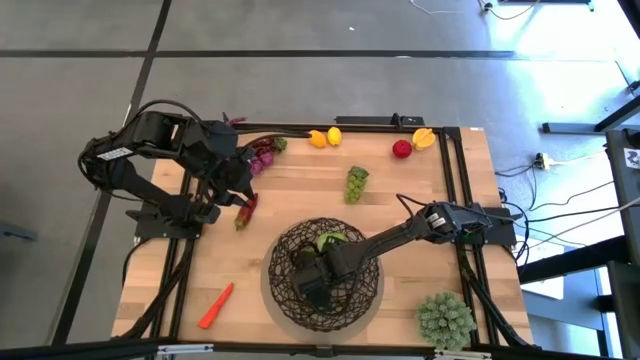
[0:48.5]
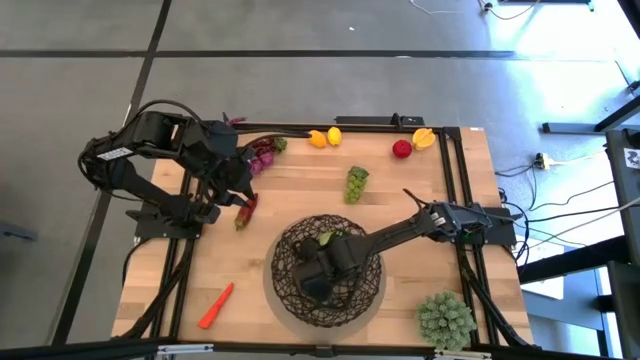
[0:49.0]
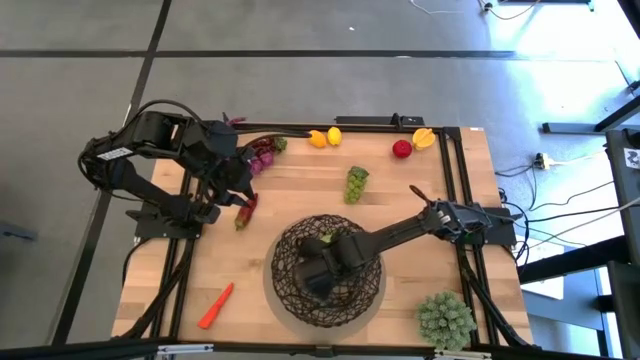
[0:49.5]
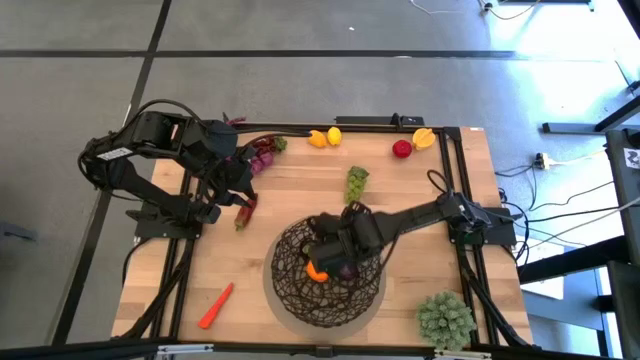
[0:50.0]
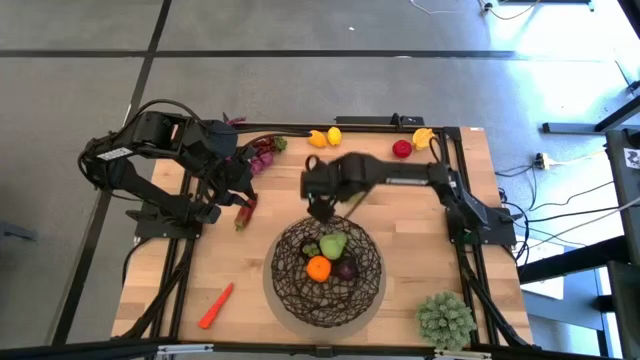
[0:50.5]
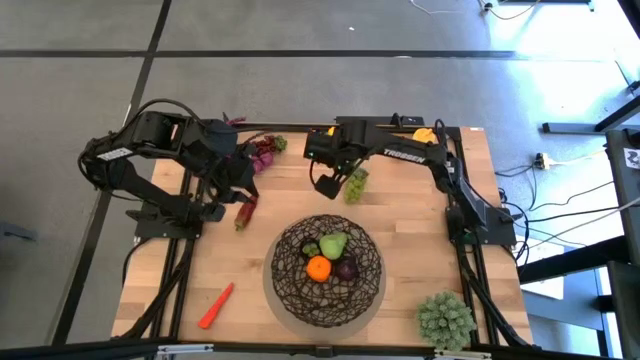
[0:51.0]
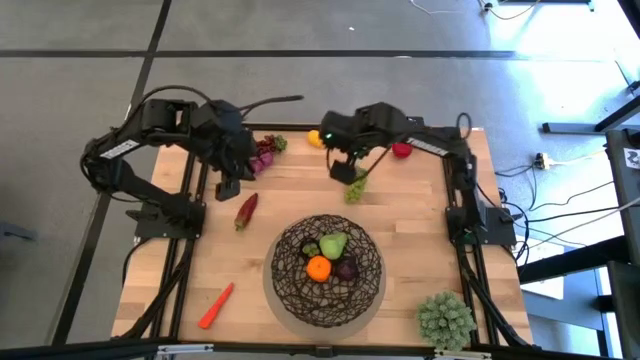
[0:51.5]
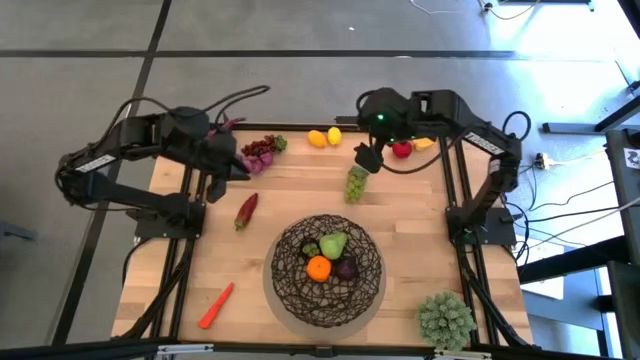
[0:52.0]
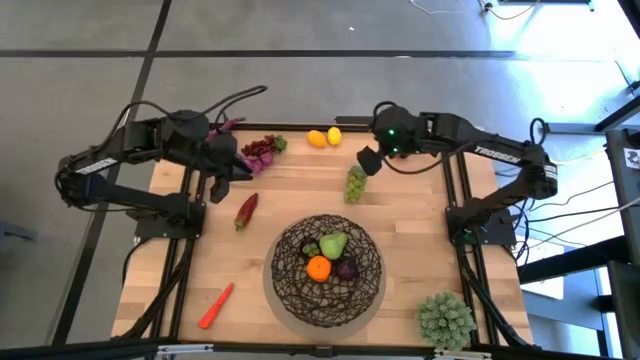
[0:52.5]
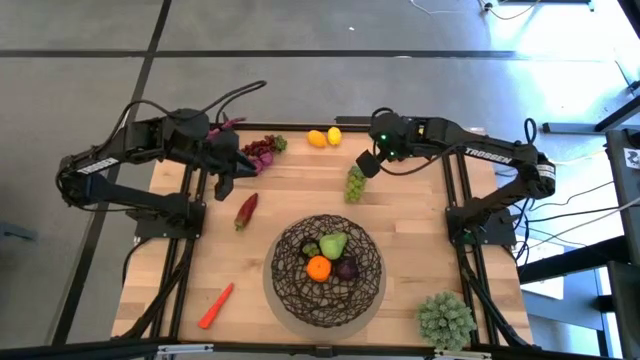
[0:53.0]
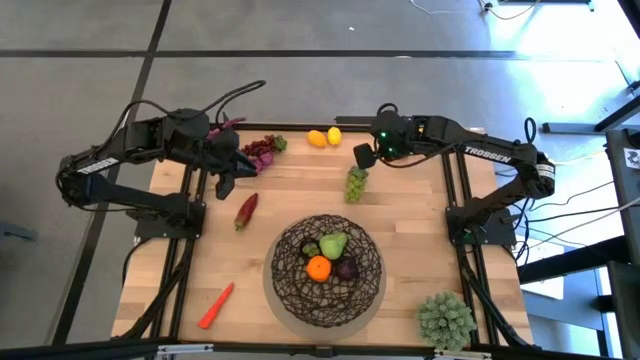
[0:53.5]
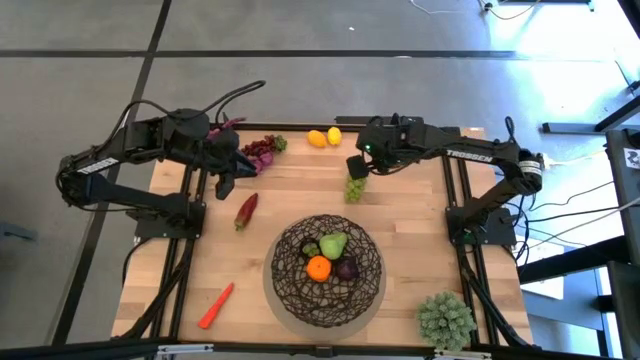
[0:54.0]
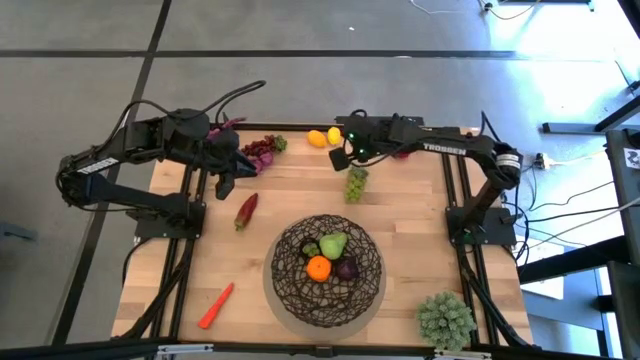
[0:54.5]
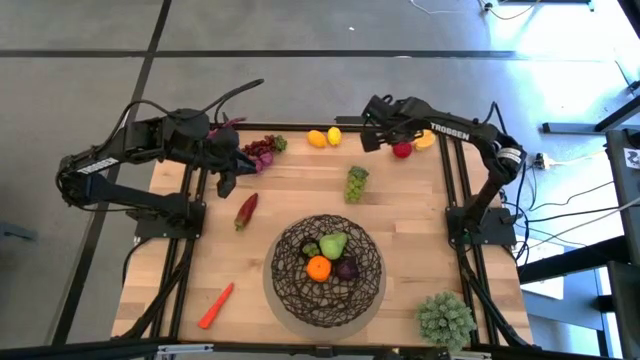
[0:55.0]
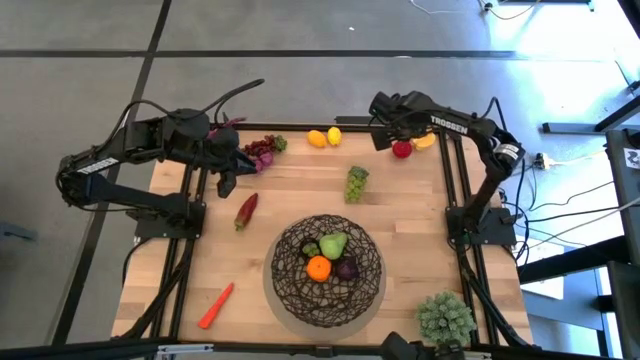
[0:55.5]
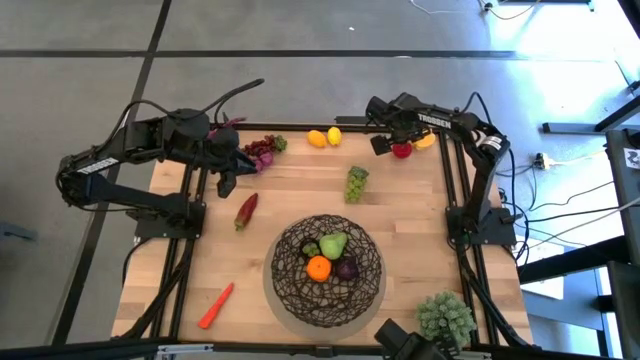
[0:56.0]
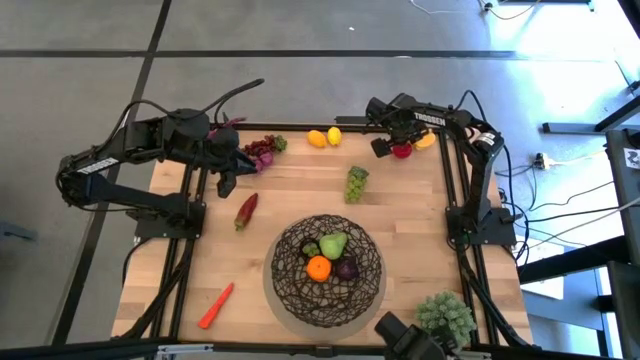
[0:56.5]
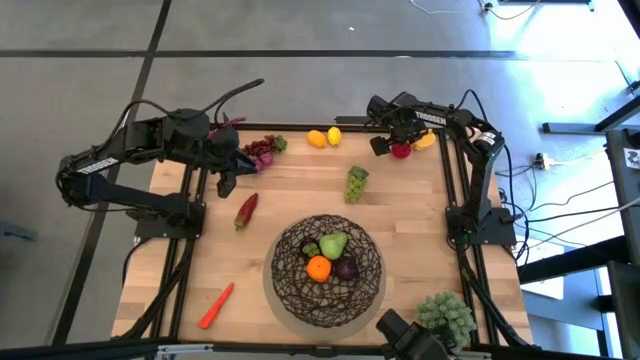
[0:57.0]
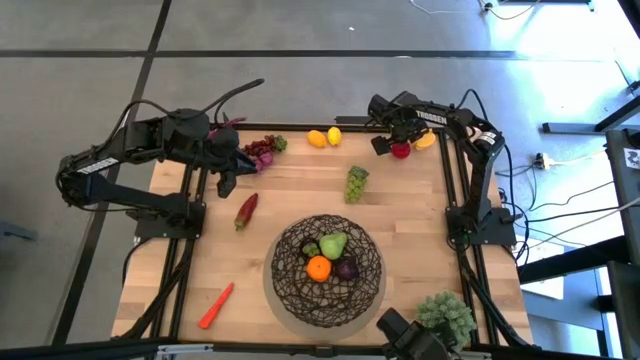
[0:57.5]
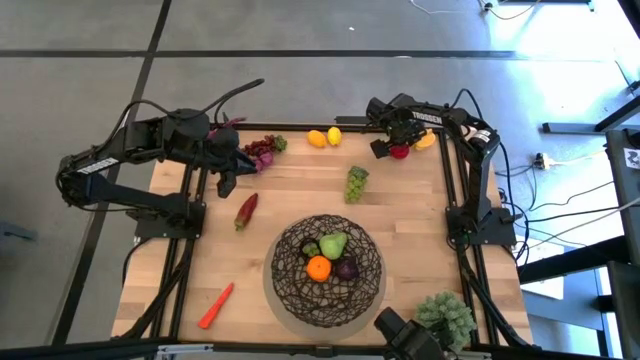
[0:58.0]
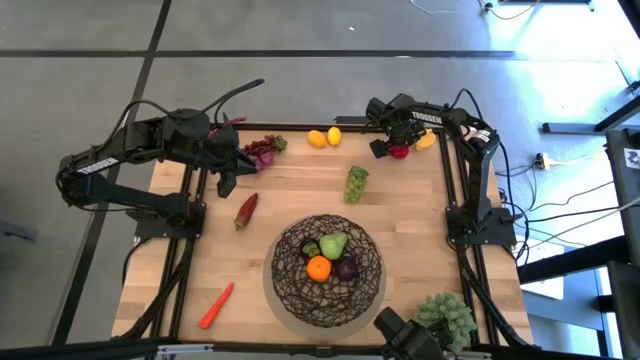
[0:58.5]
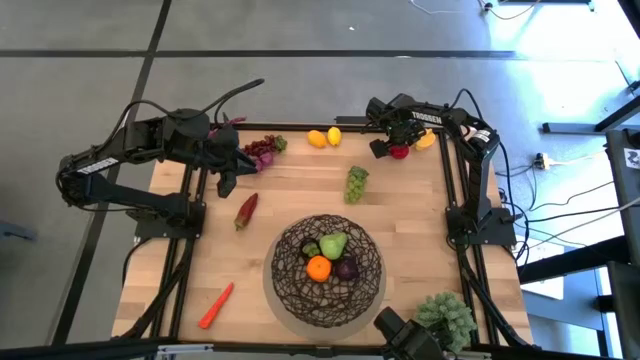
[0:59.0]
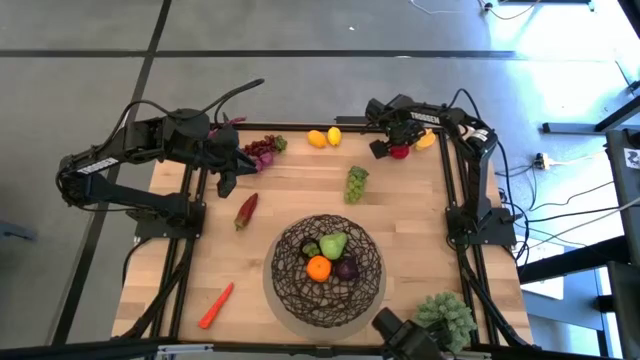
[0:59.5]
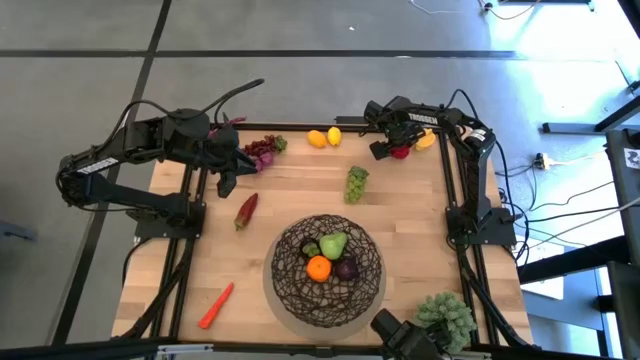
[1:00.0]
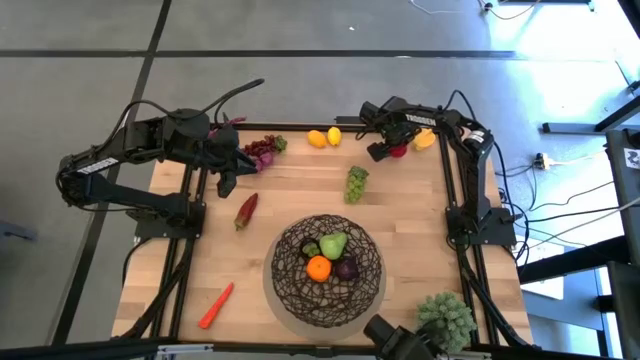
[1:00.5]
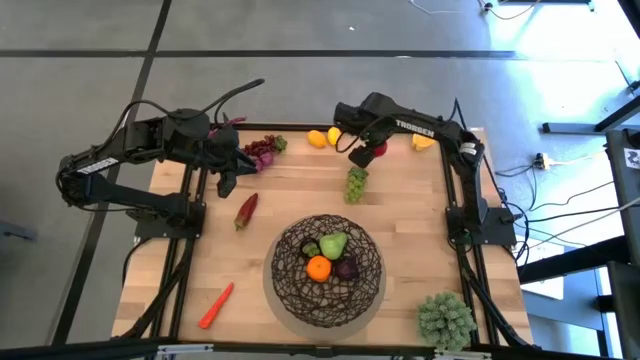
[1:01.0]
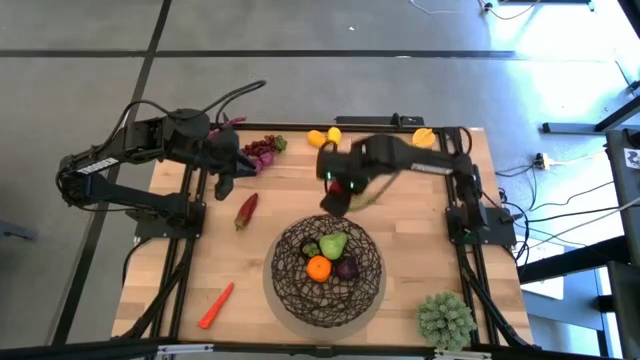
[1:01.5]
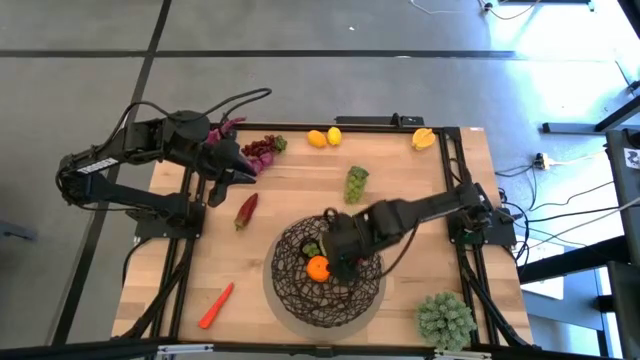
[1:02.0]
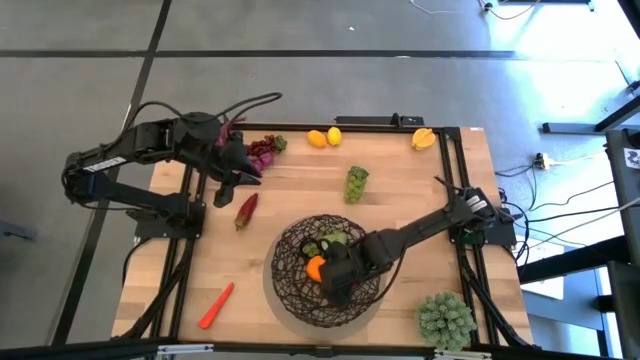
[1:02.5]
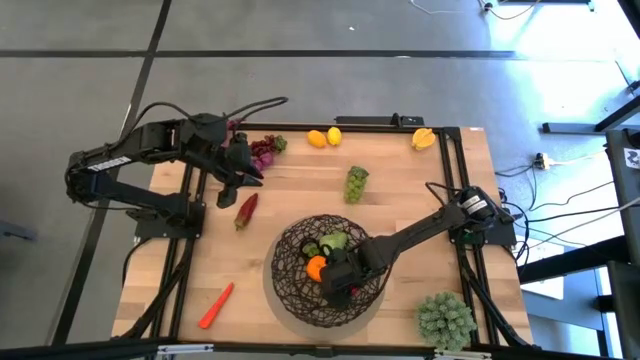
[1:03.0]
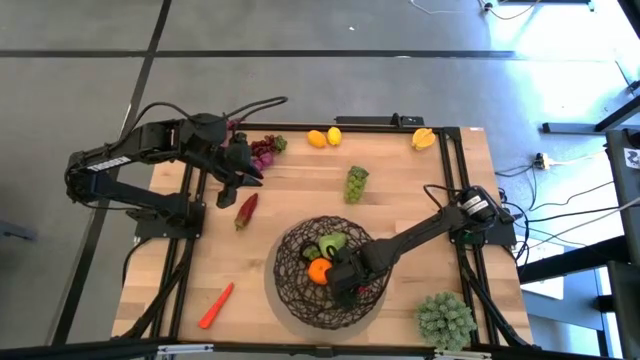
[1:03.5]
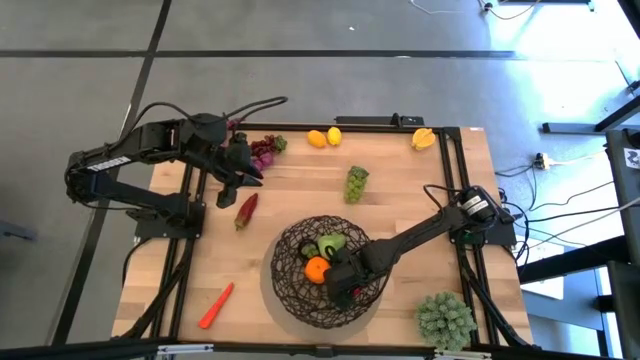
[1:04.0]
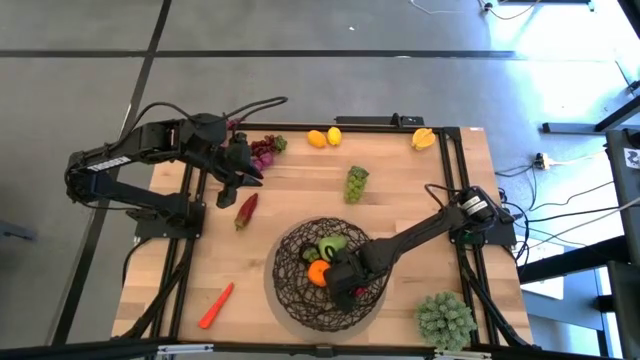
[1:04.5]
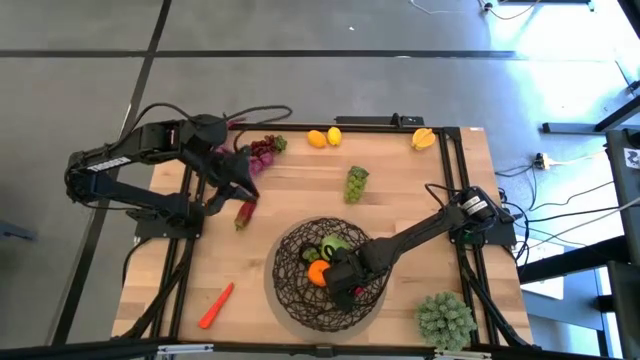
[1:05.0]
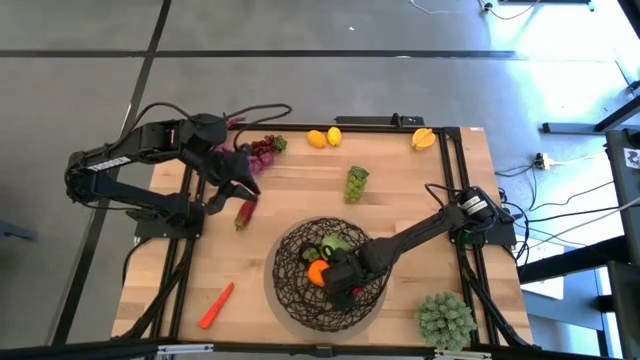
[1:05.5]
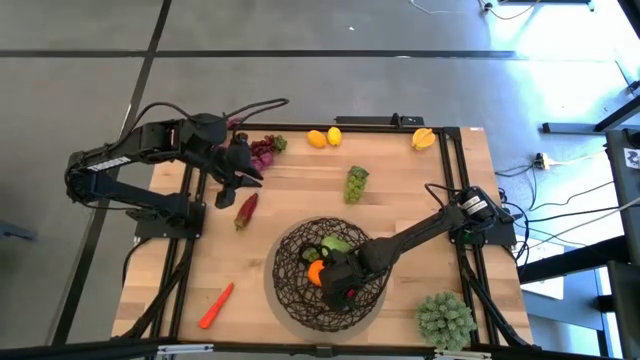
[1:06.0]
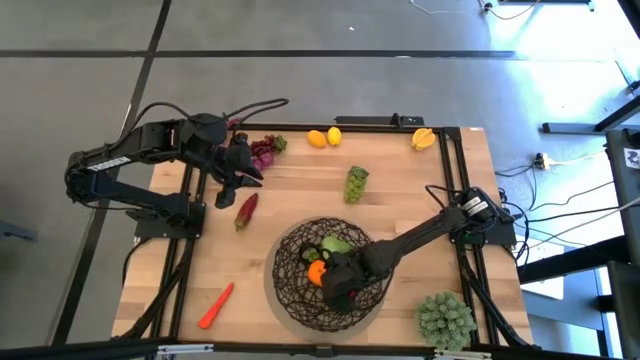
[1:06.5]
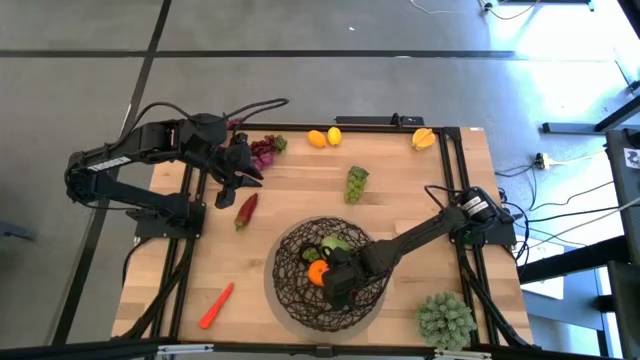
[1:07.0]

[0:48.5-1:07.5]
Task: Build produce basket
Put the tomato into the mesh basket

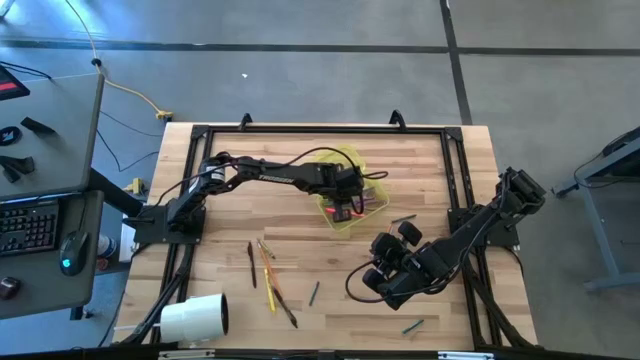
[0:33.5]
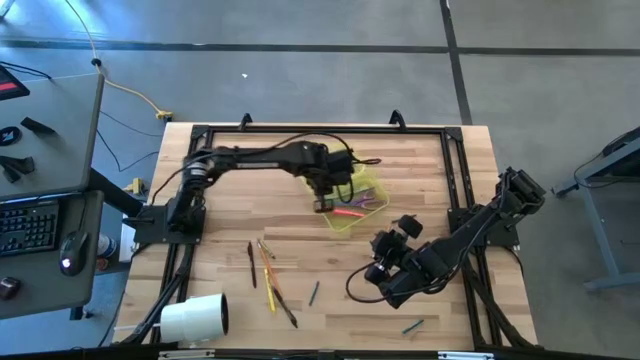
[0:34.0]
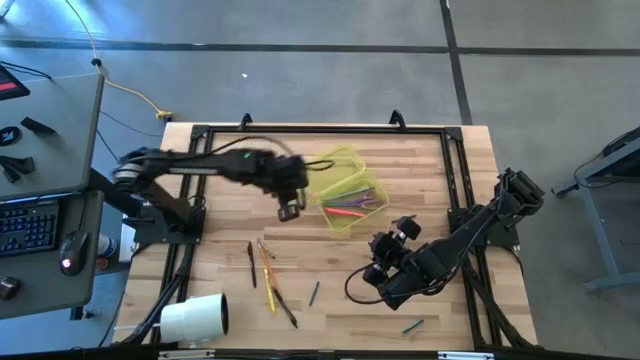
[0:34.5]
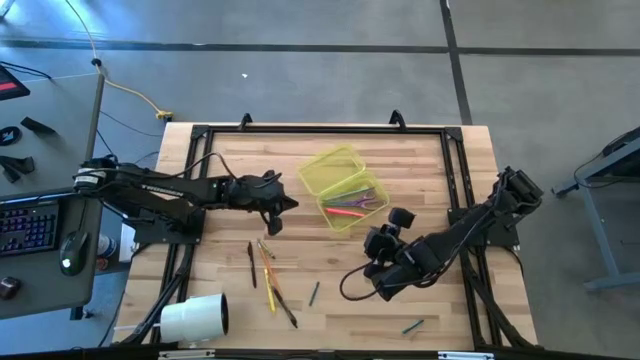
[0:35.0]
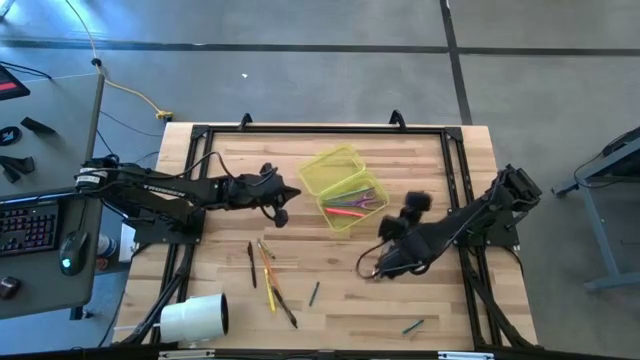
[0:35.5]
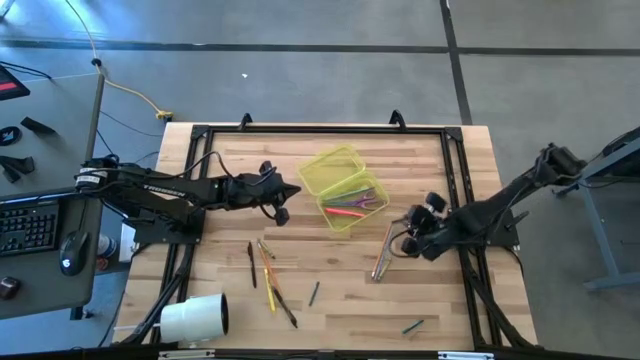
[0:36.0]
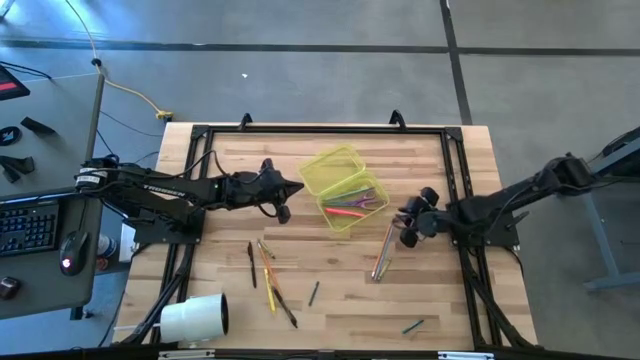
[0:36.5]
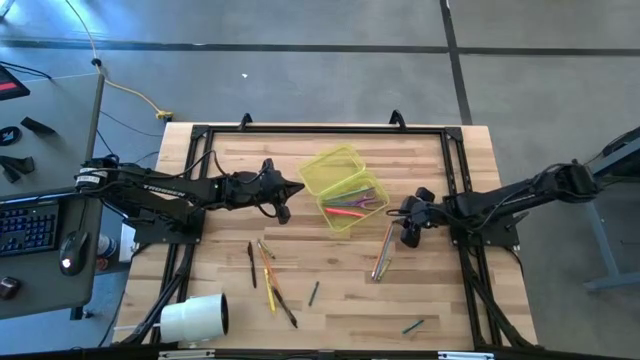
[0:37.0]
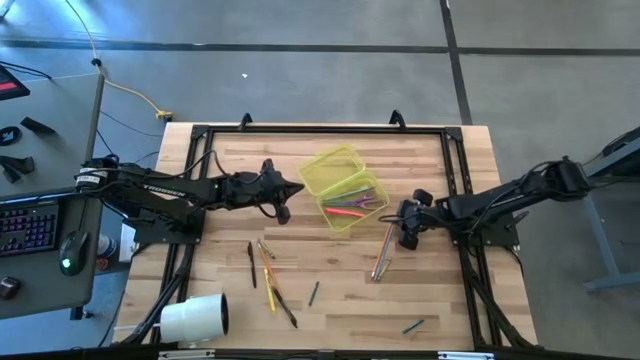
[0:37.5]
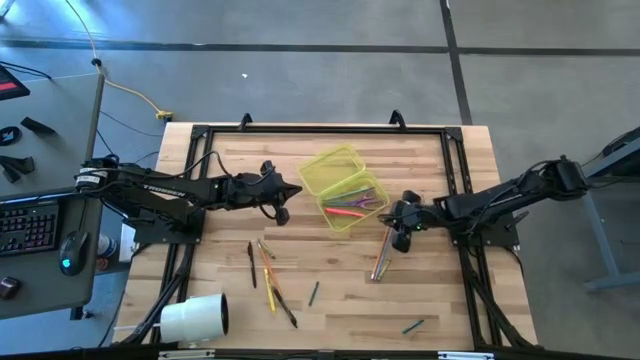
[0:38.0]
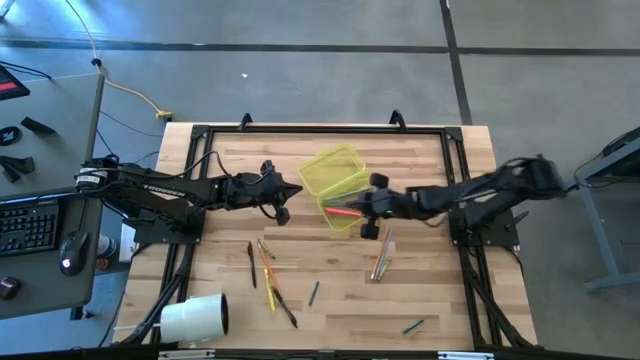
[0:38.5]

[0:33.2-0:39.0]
Task: Pick & place school supplies into a supply box
Put the blue crayon into the supply box
